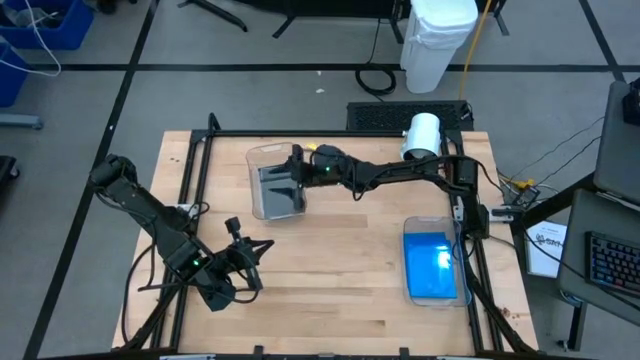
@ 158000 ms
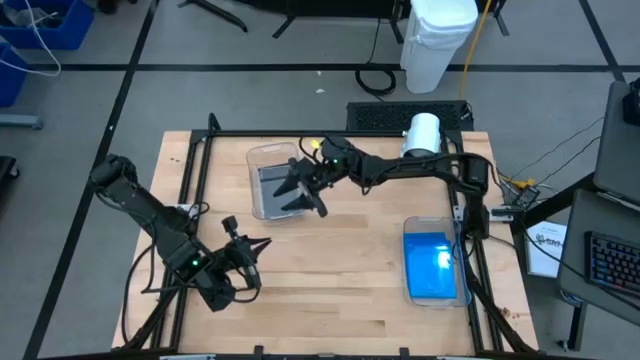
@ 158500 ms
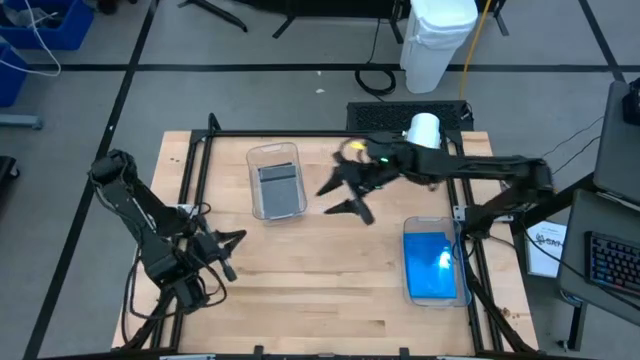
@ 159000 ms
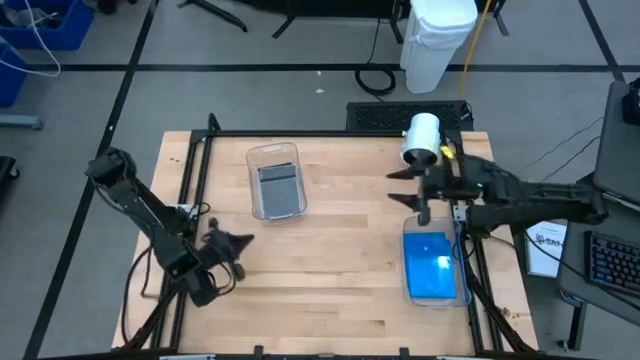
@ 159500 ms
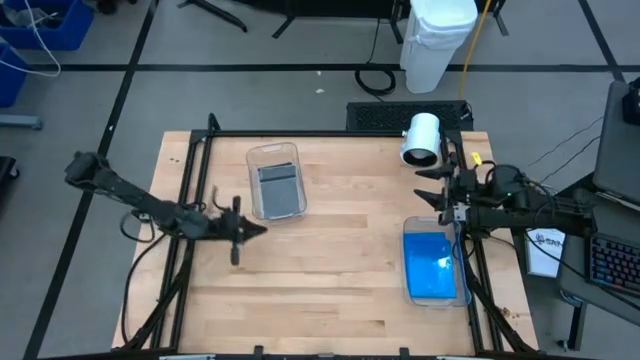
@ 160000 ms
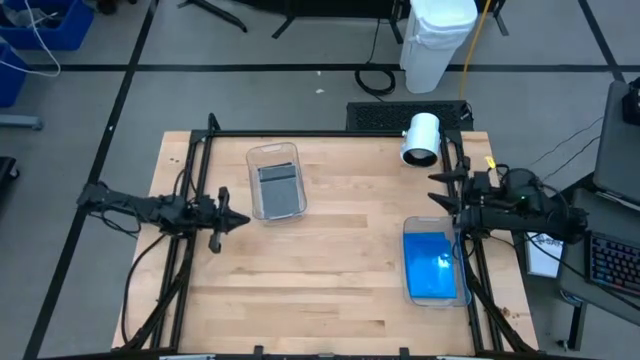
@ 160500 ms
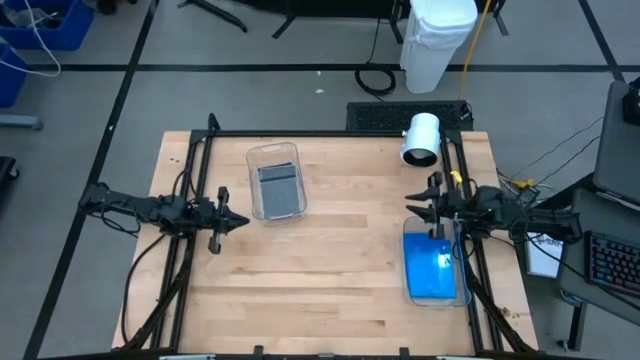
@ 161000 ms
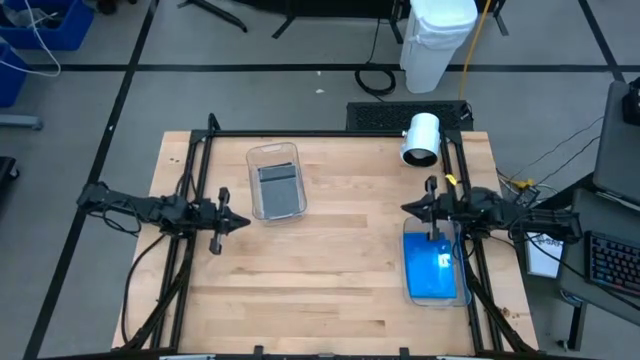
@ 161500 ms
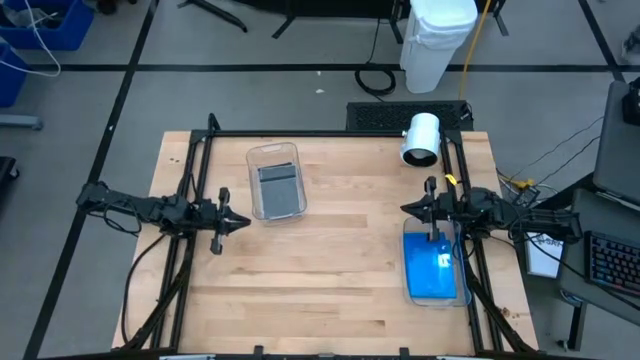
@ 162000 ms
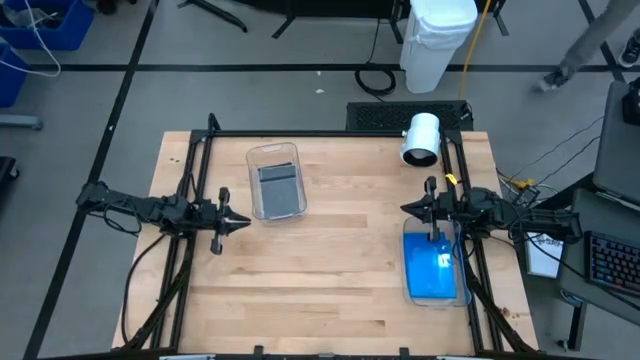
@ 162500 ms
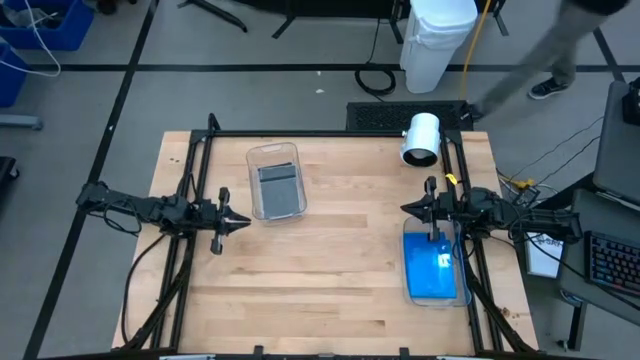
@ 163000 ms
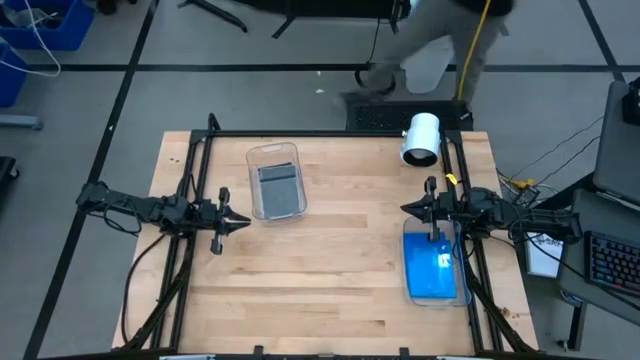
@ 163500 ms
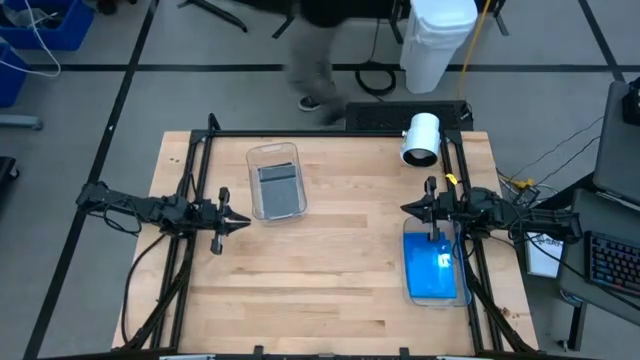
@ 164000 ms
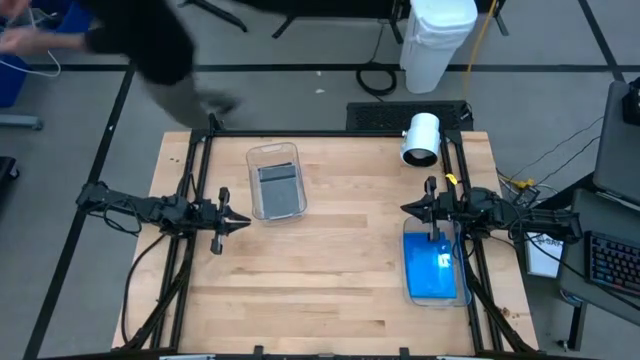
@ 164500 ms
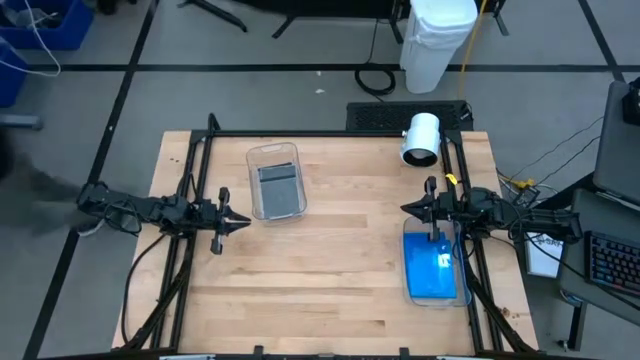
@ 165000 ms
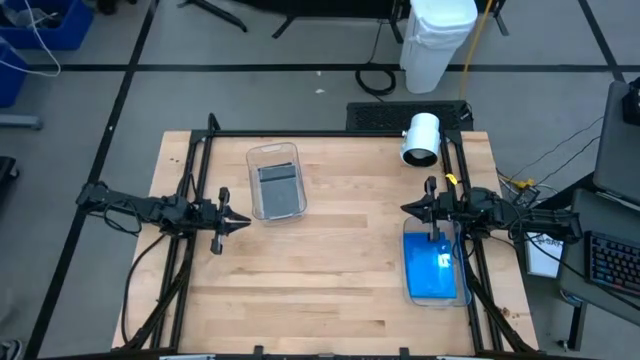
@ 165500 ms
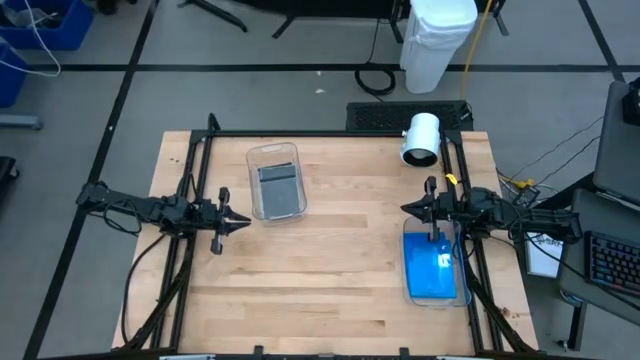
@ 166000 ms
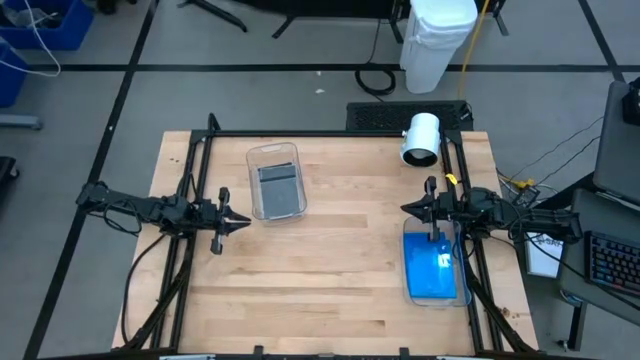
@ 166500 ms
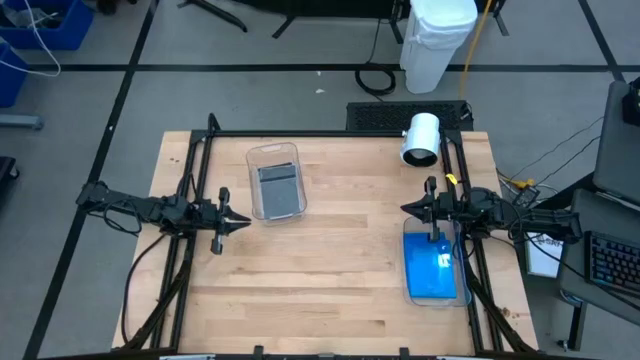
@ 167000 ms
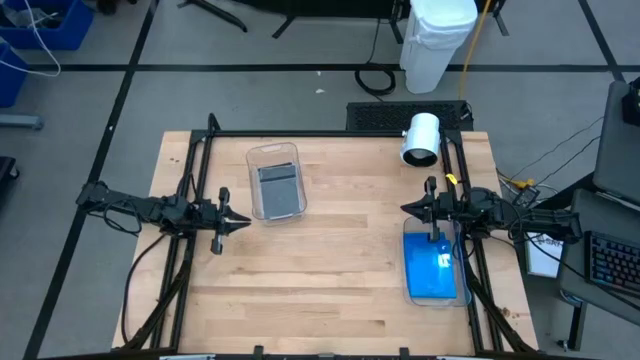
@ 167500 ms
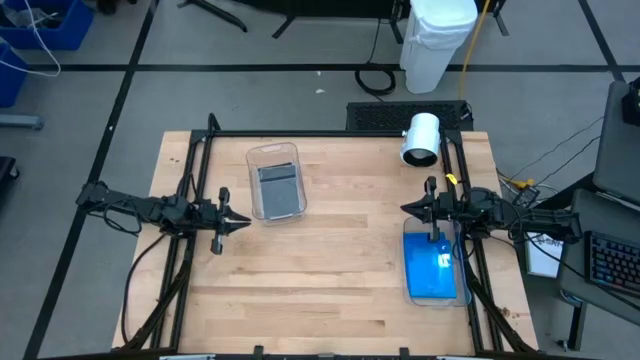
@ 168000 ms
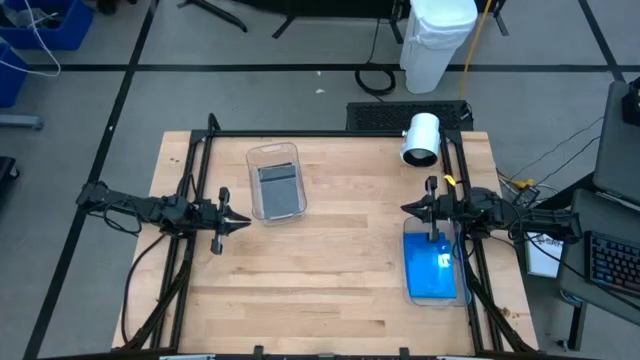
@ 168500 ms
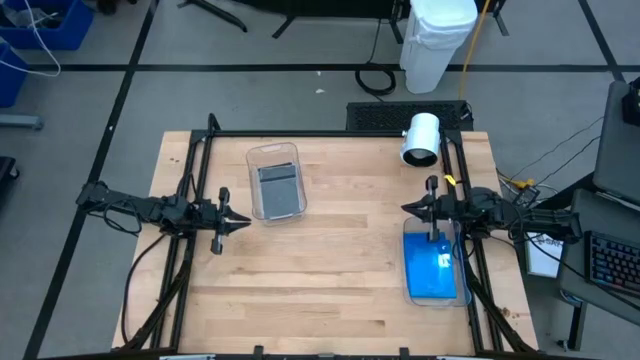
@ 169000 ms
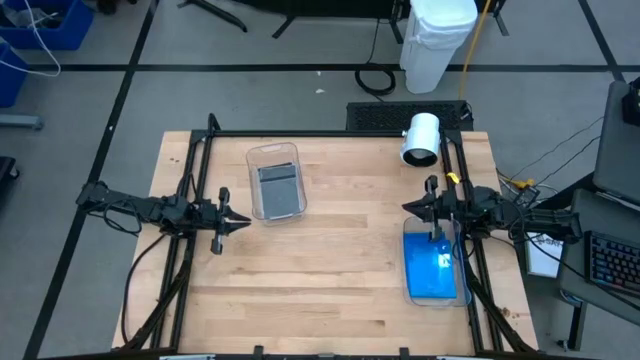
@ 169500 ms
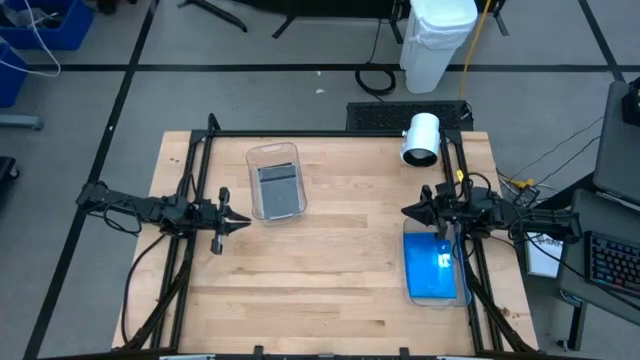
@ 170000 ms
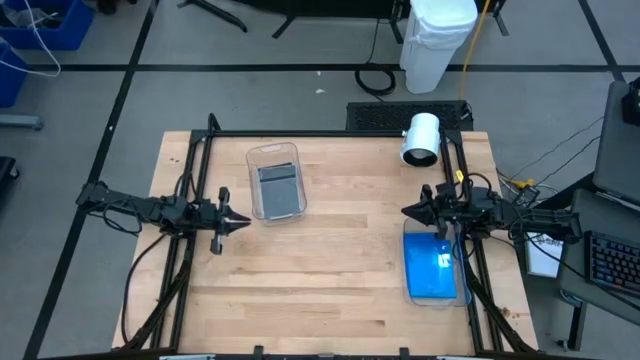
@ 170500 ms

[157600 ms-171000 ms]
Task: Pick & place jewel cases by type
Adjust the left transparent bin

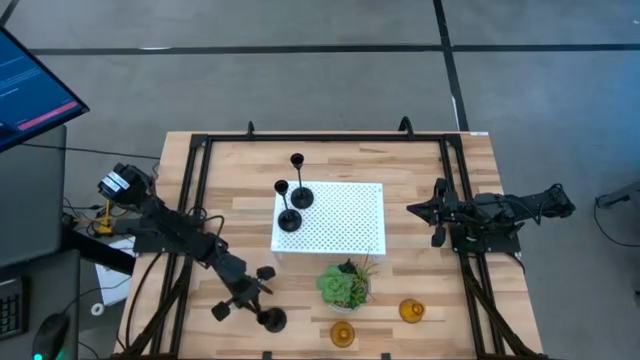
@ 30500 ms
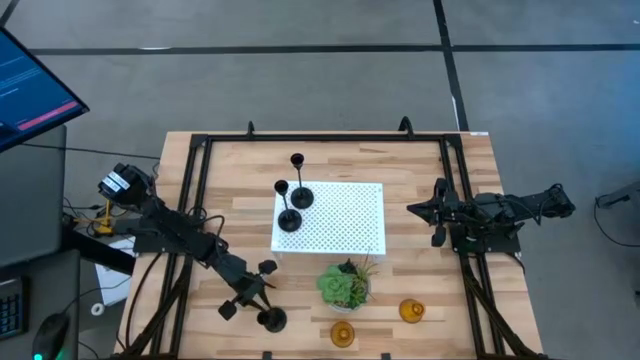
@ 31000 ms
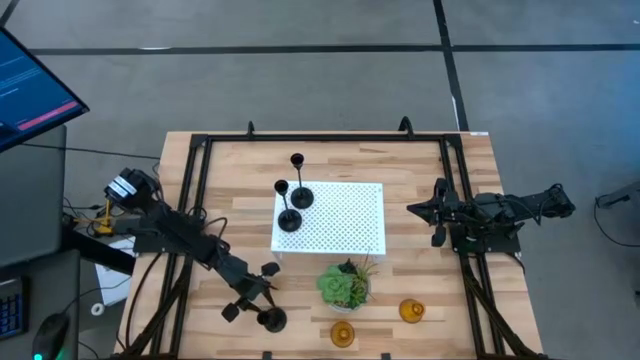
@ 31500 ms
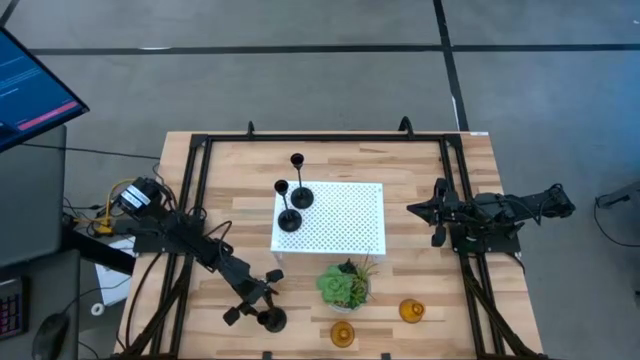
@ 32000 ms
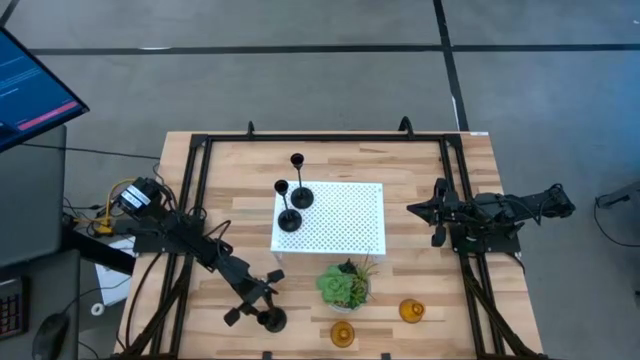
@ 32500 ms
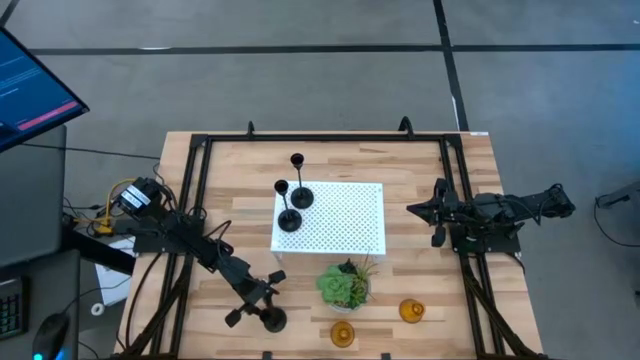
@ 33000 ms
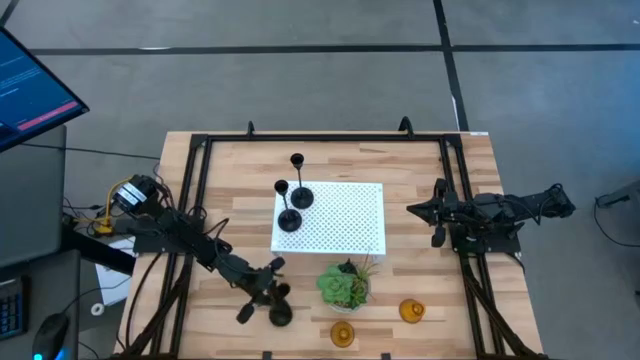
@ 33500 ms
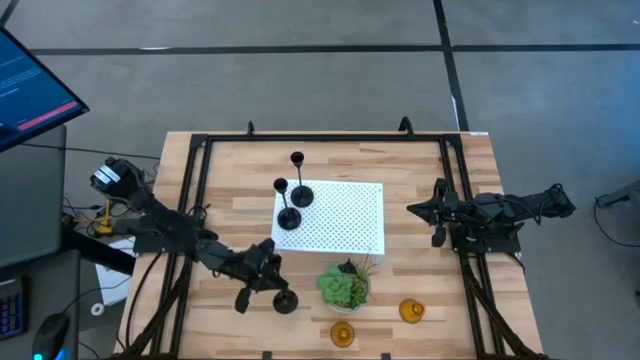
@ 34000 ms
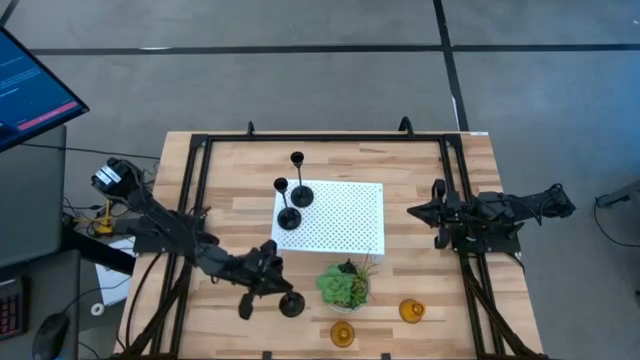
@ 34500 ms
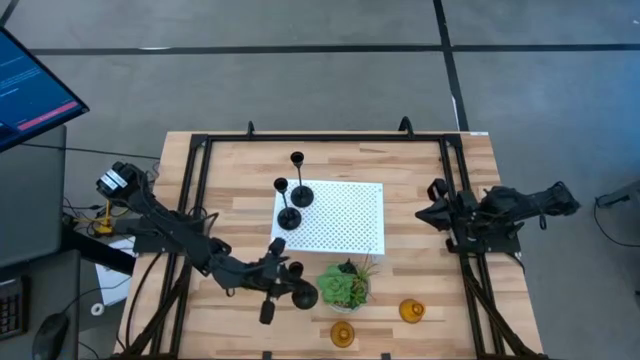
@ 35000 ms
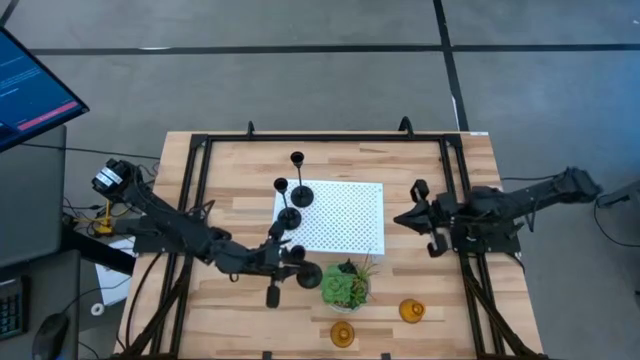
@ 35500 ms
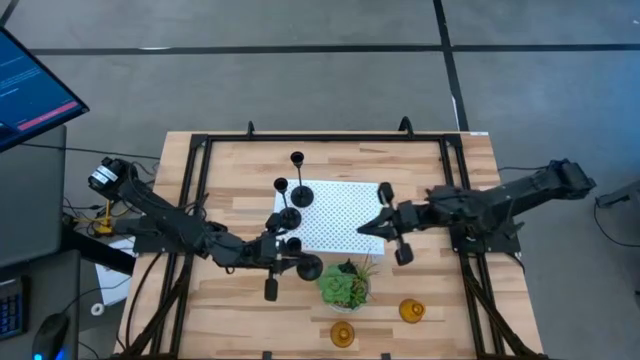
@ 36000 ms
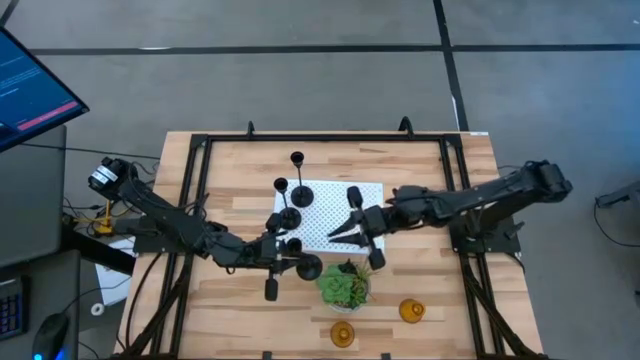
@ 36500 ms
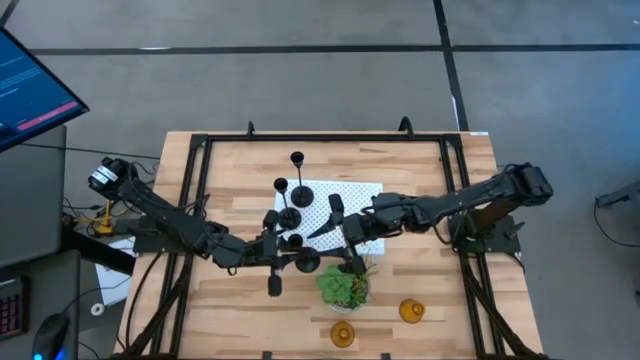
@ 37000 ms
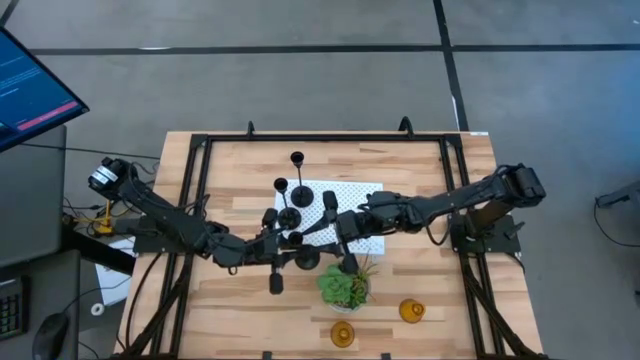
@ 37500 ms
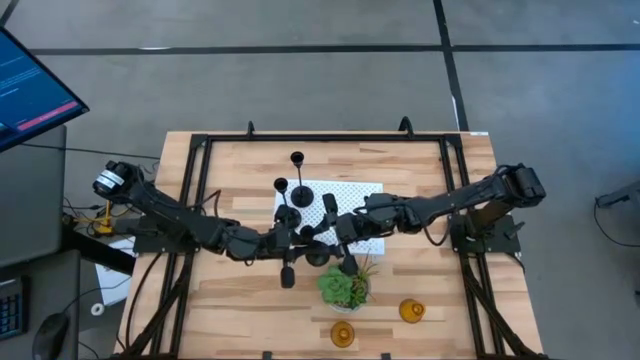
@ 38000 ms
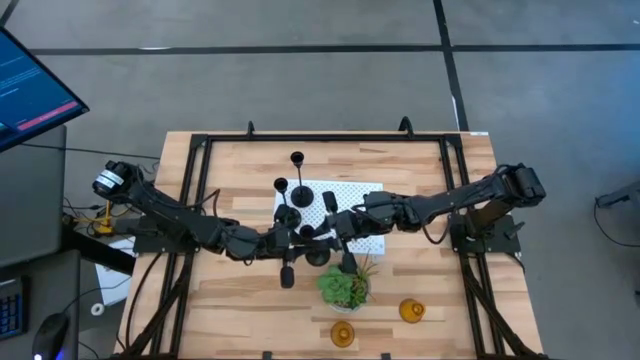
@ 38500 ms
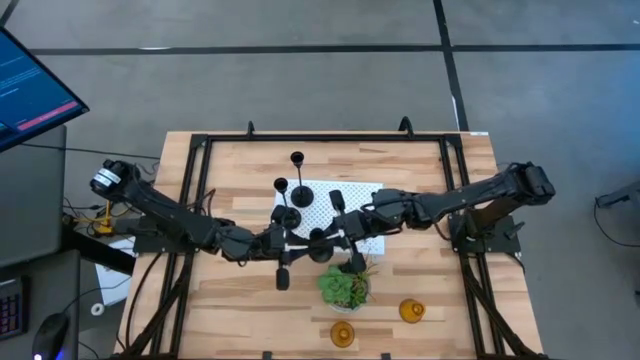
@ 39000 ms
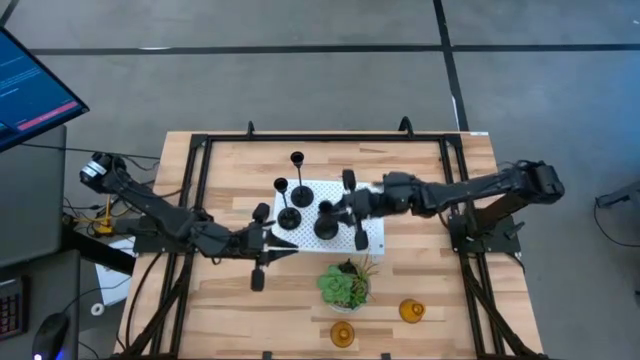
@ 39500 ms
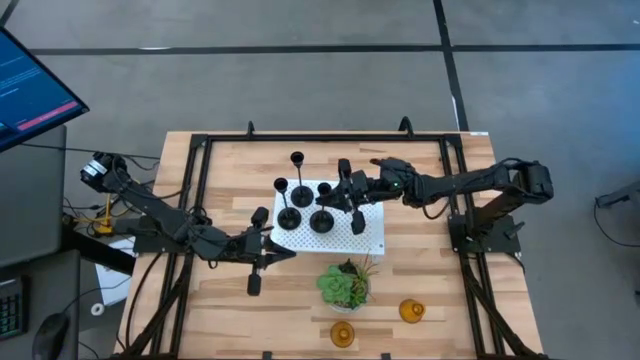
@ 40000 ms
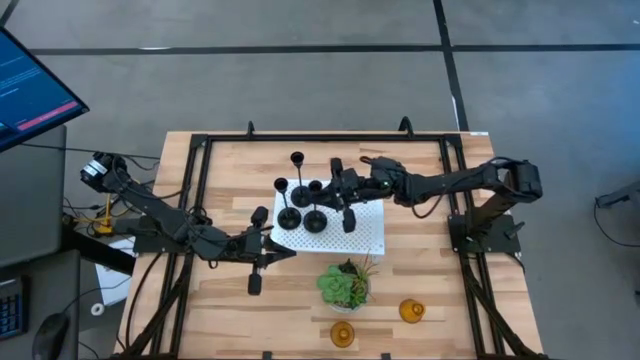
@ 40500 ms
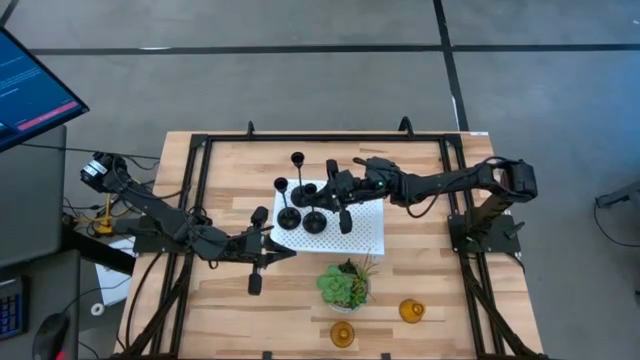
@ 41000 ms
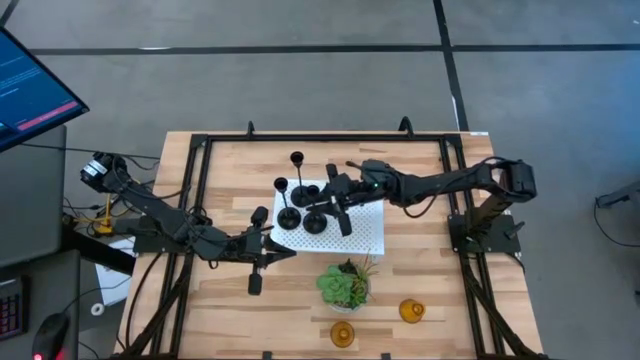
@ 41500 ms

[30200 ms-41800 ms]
Task: Pick & Place candle stick holders
Put the black candle holder on the shelf
